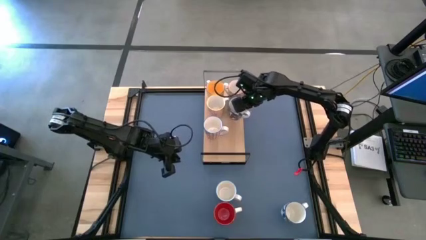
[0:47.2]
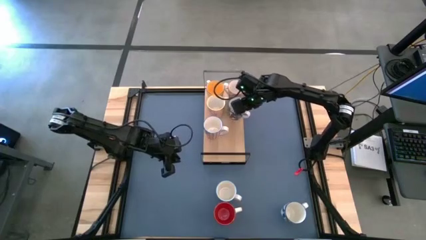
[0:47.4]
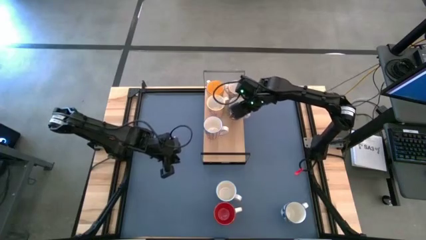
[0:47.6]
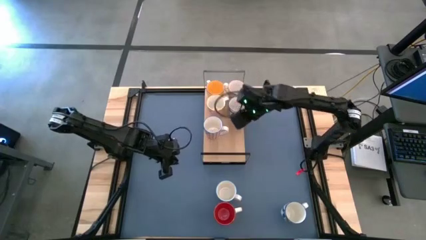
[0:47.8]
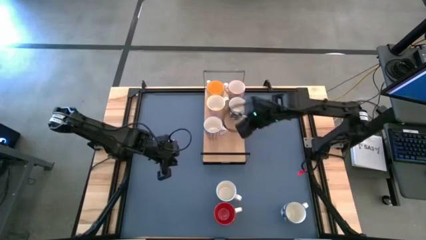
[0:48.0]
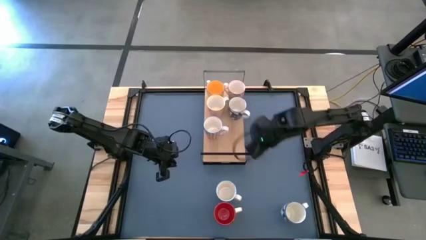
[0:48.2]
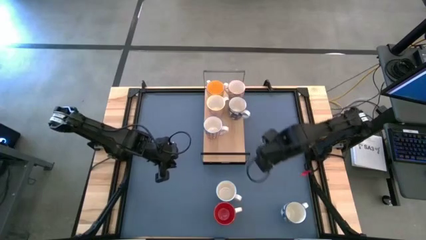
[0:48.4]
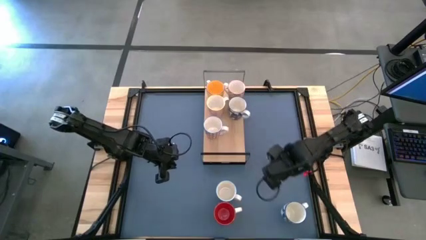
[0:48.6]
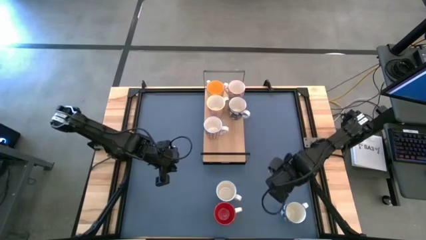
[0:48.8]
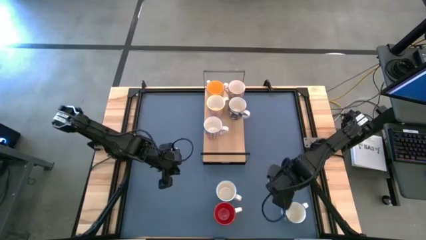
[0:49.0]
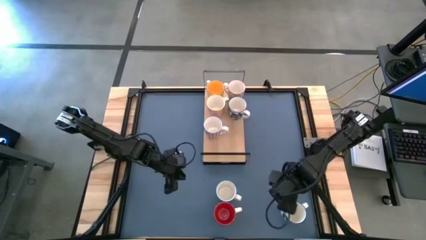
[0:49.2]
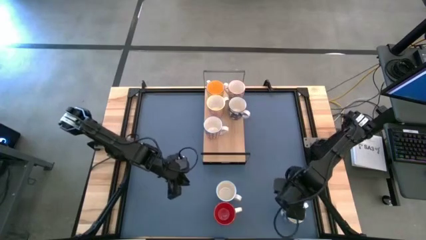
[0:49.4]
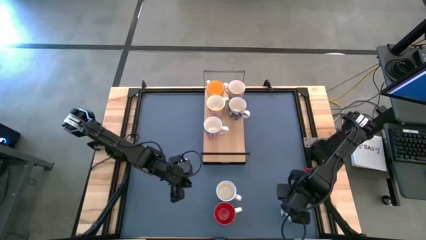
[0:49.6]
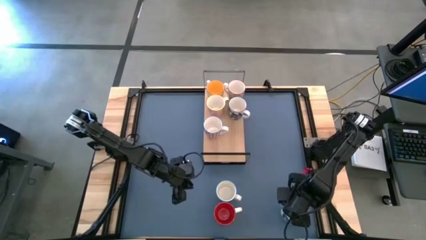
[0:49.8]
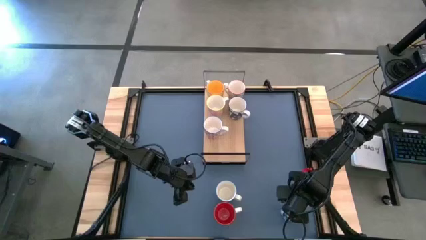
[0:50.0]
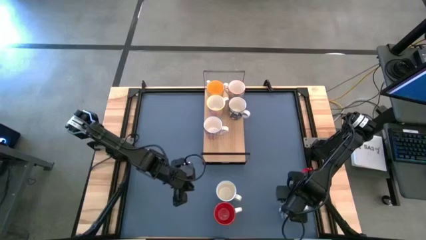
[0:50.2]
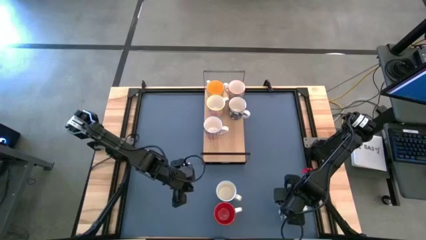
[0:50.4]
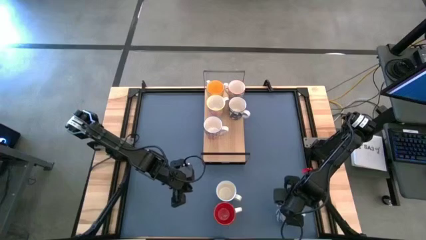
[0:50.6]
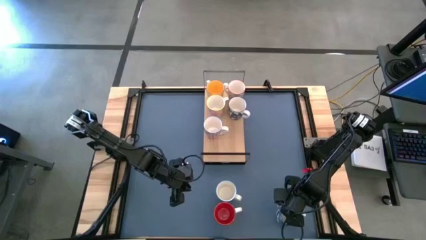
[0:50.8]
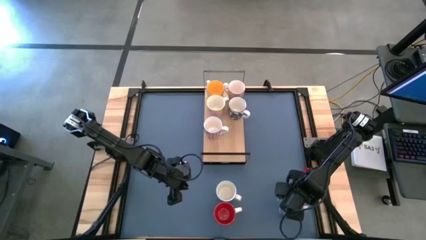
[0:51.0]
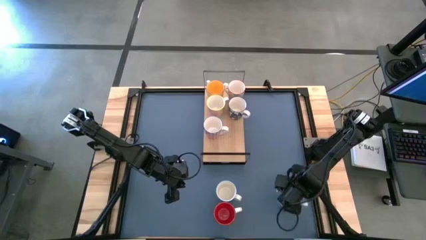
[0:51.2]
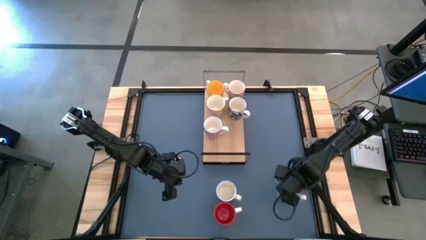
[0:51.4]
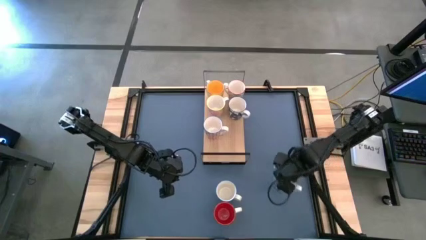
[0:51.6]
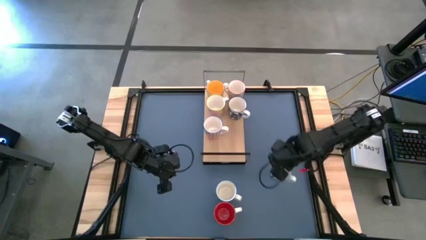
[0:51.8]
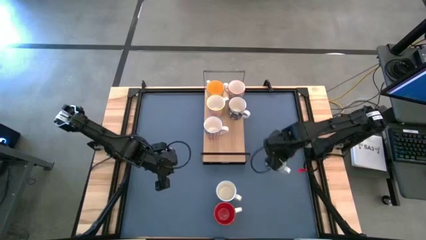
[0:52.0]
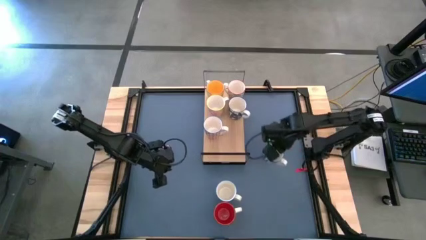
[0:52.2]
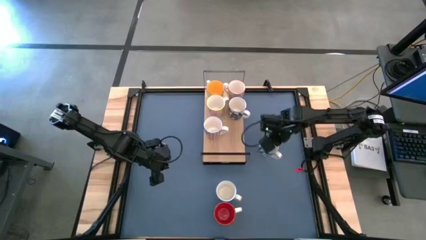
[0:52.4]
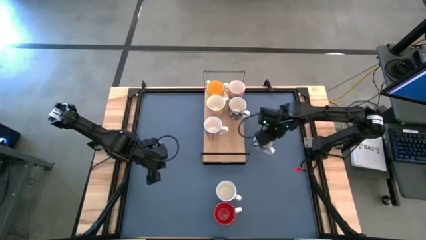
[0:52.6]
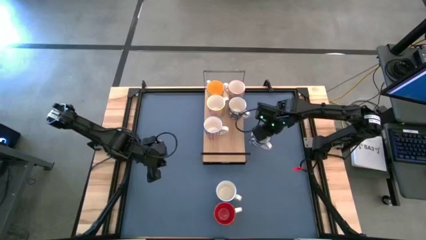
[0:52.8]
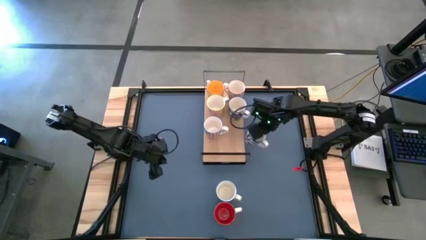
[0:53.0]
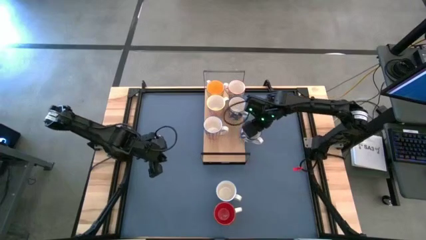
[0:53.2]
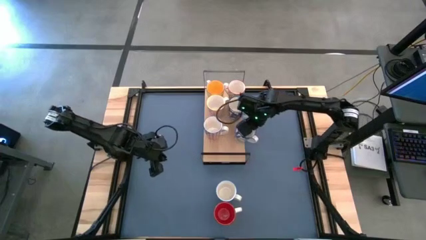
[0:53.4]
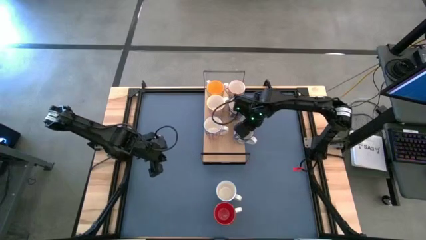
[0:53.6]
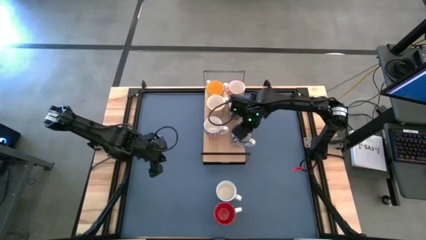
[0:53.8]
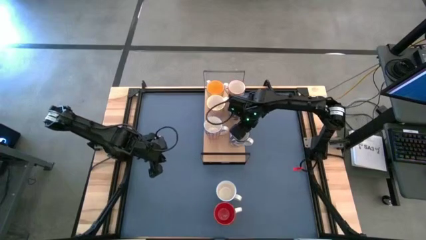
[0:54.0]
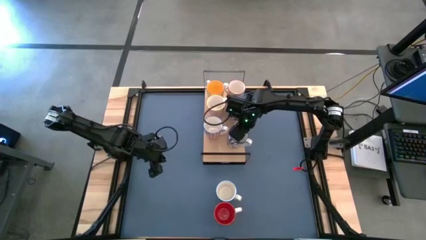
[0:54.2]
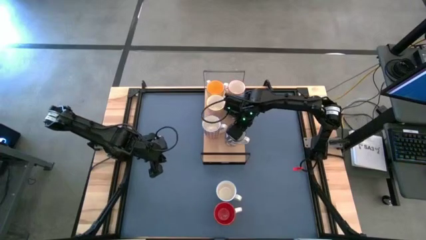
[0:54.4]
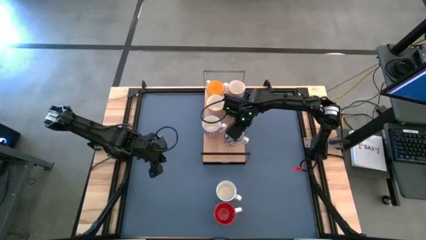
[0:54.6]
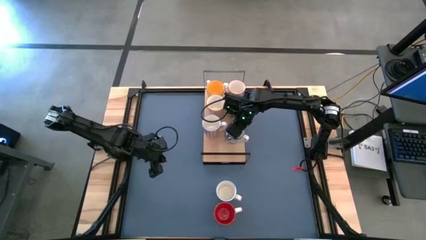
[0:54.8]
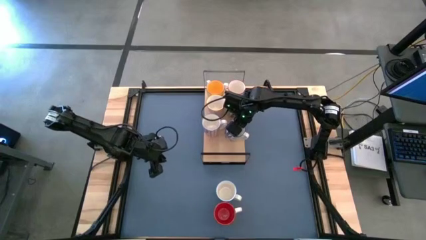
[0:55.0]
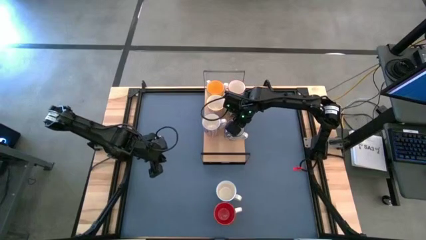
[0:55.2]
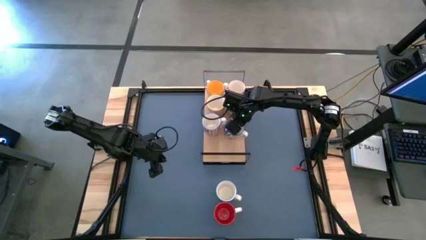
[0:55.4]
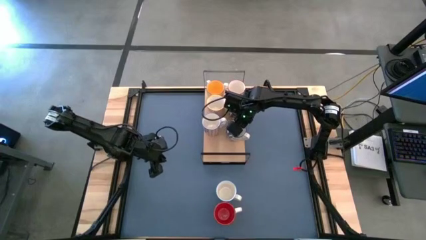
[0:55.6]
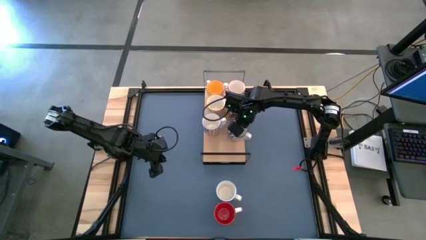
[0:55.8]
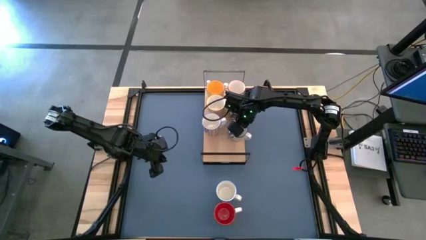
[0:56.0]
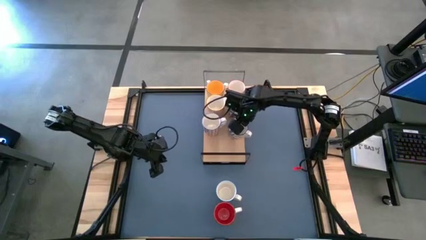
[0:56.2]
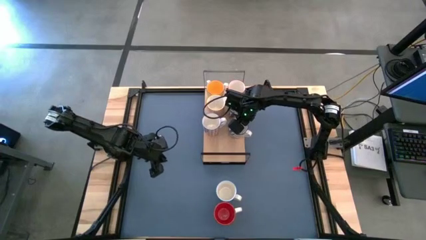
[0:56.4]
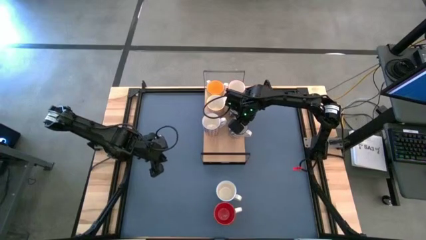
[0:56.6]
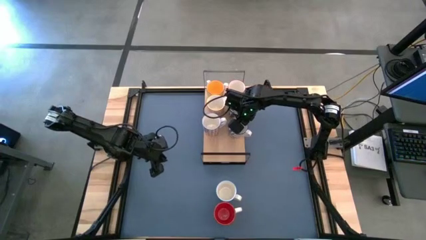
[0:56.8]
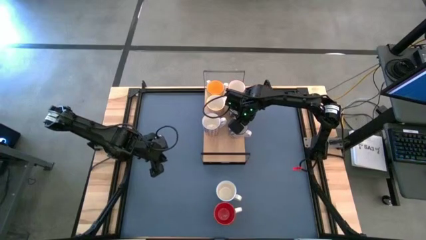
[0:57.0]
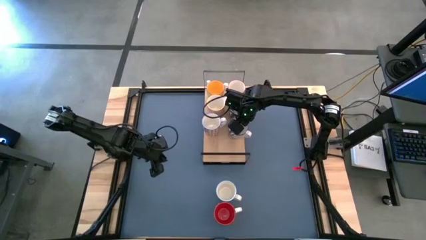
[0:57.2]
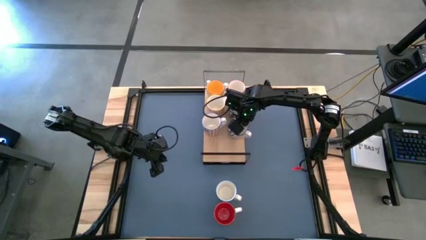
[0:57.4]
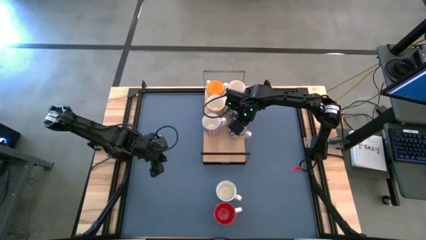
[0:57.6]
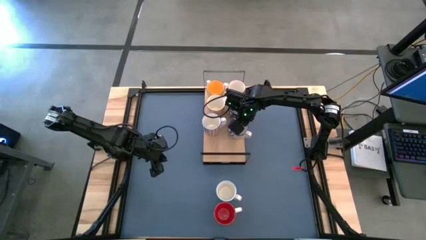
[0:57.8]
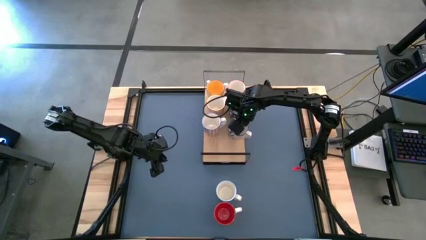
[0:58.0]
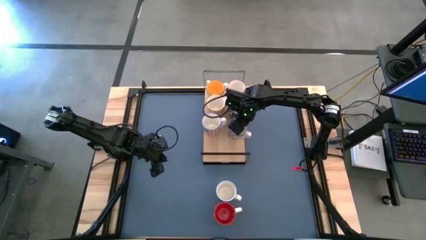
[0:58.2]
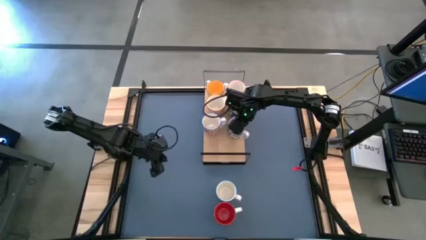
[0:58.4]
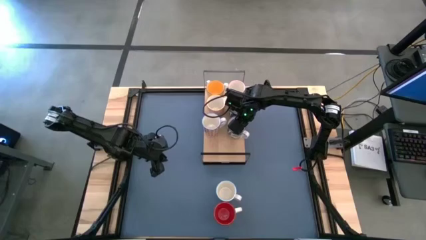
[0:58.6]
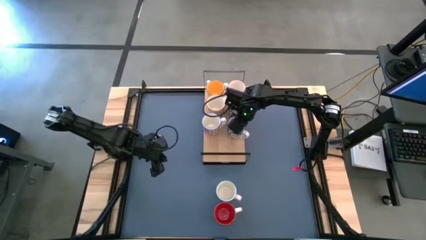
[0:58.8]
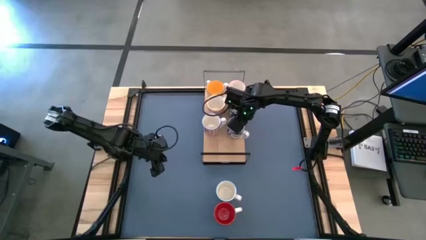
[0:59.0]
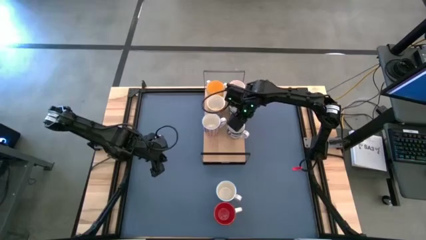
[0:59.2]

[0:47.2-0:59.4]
Task: Place coffee mugs
Put the blue mug on the shelf
